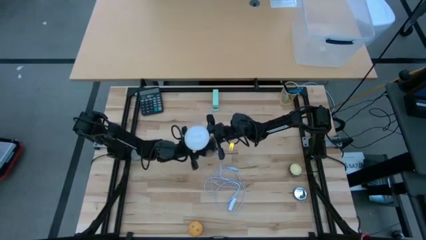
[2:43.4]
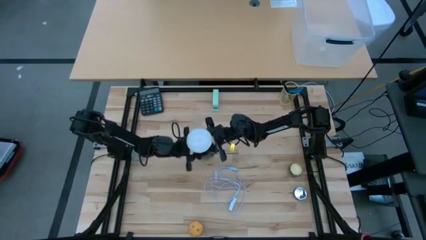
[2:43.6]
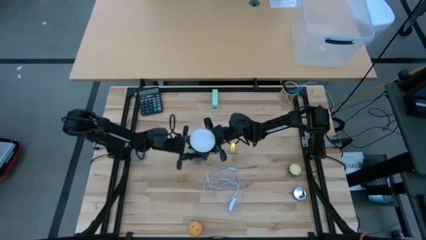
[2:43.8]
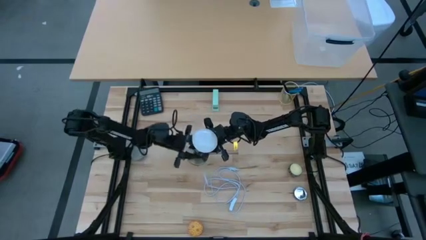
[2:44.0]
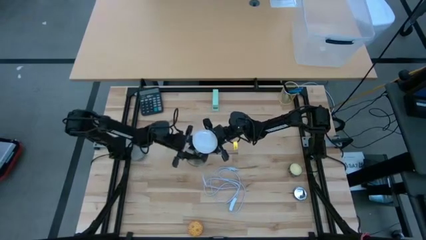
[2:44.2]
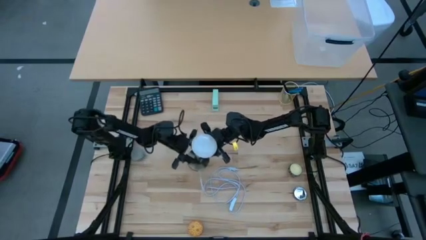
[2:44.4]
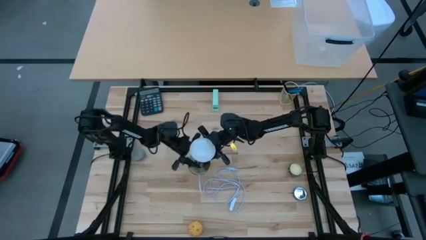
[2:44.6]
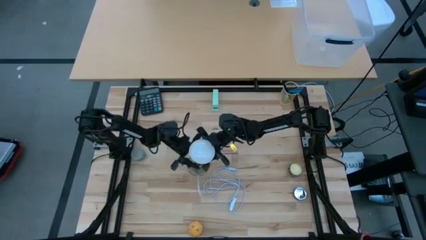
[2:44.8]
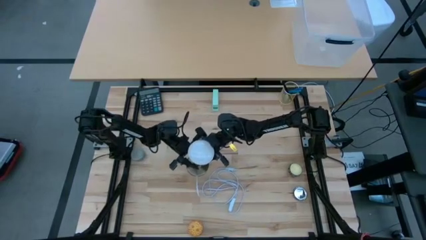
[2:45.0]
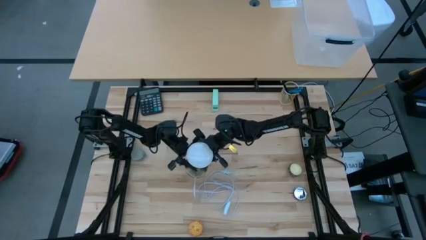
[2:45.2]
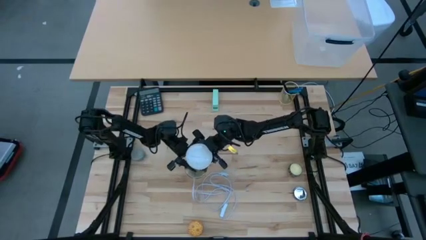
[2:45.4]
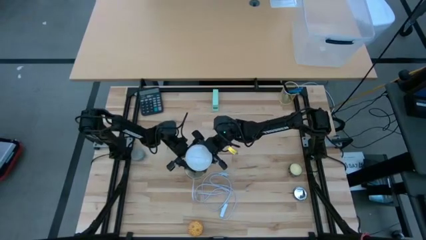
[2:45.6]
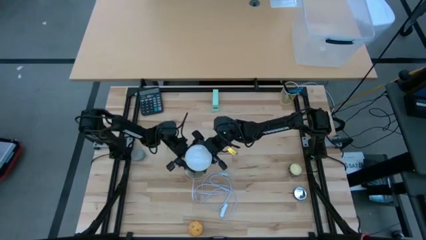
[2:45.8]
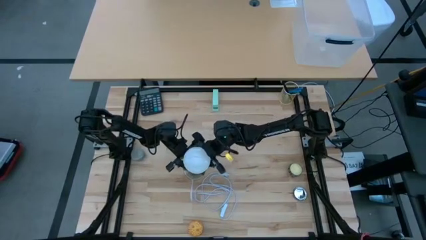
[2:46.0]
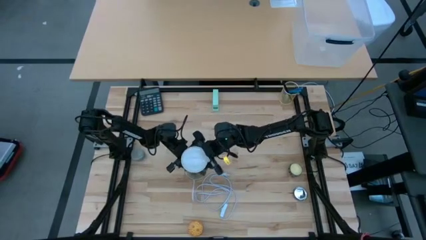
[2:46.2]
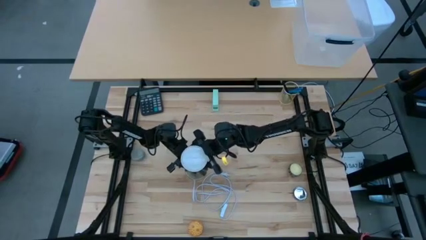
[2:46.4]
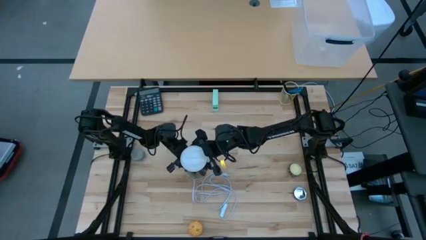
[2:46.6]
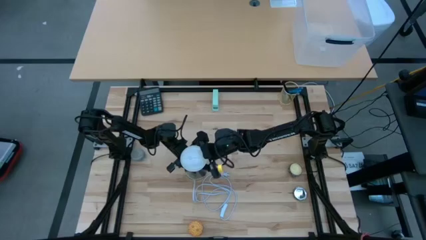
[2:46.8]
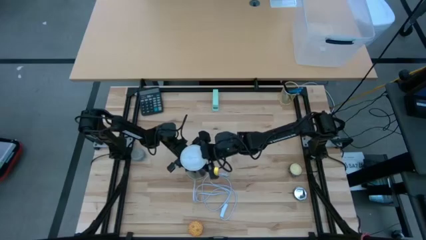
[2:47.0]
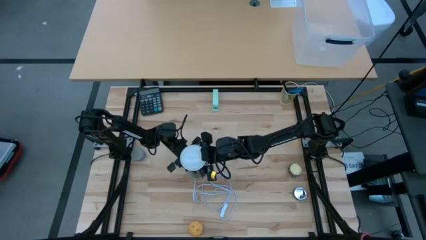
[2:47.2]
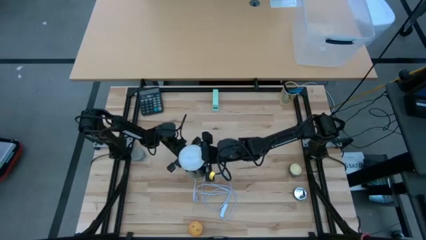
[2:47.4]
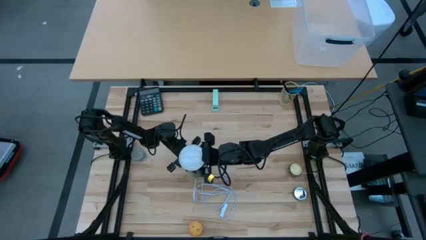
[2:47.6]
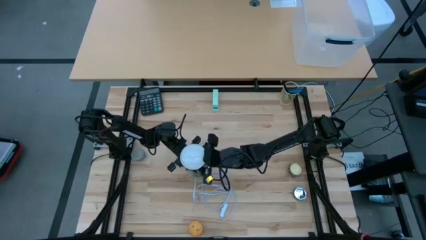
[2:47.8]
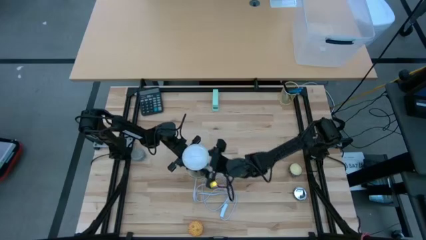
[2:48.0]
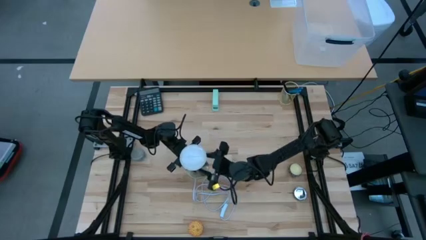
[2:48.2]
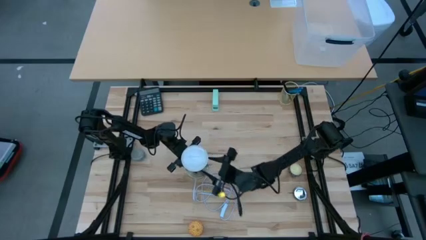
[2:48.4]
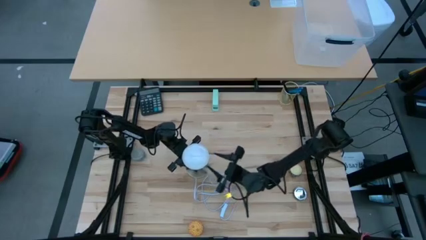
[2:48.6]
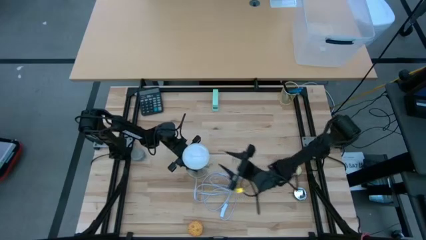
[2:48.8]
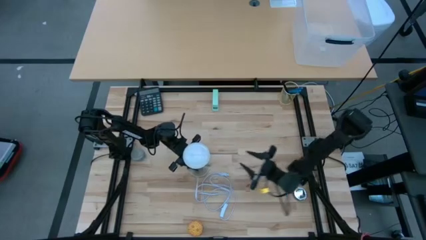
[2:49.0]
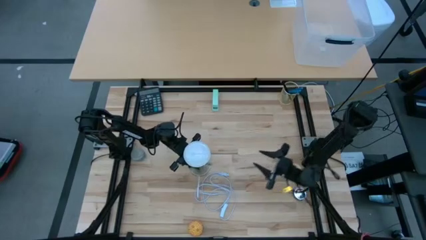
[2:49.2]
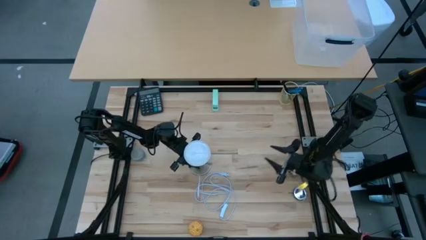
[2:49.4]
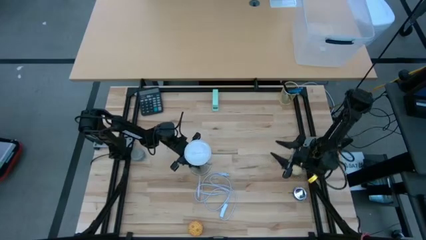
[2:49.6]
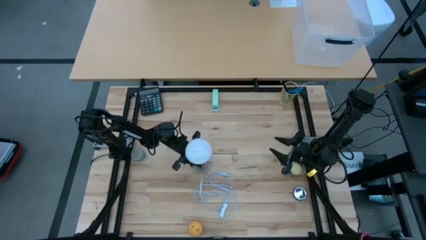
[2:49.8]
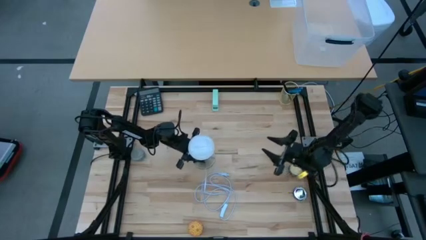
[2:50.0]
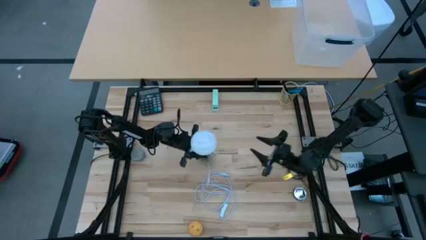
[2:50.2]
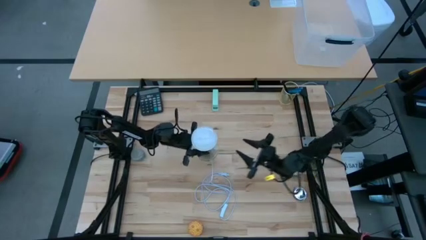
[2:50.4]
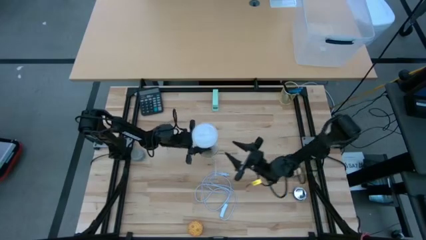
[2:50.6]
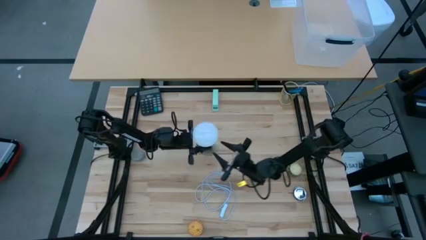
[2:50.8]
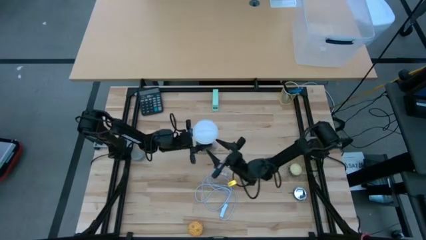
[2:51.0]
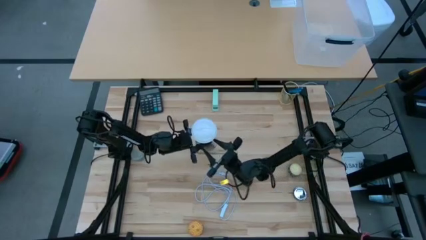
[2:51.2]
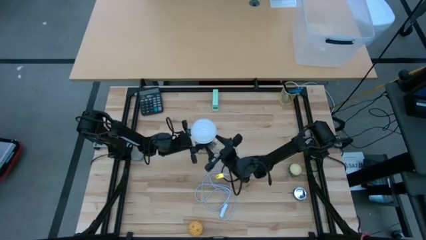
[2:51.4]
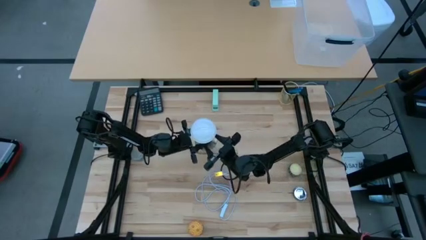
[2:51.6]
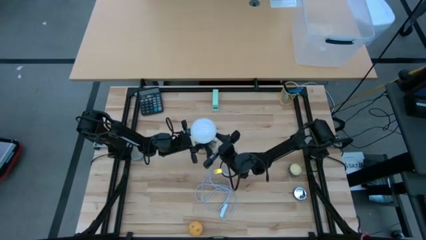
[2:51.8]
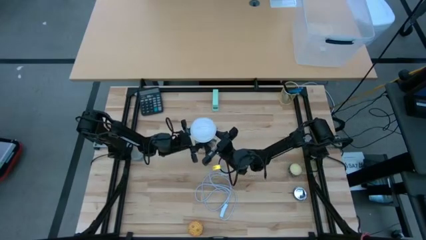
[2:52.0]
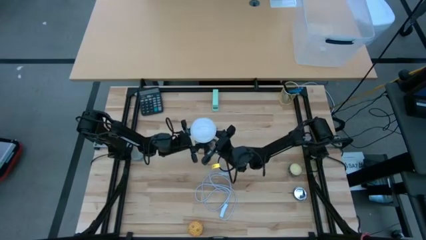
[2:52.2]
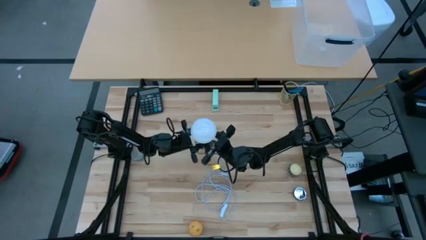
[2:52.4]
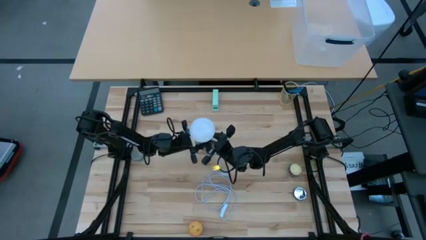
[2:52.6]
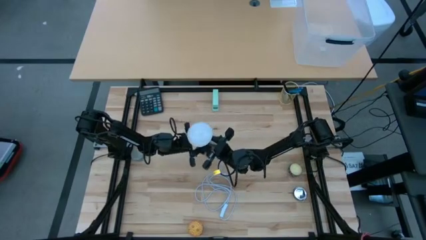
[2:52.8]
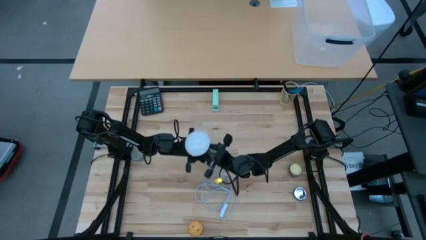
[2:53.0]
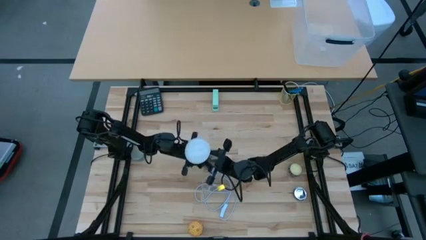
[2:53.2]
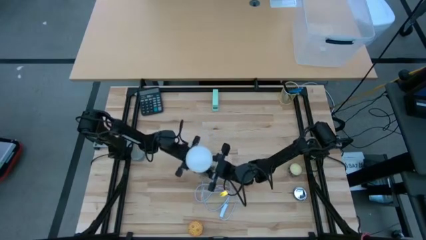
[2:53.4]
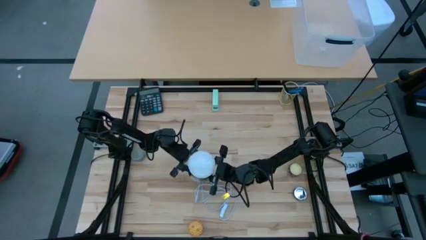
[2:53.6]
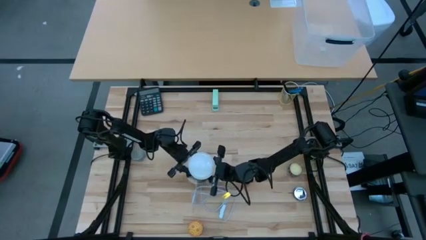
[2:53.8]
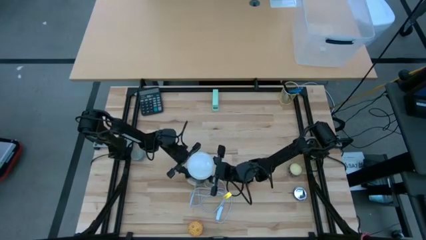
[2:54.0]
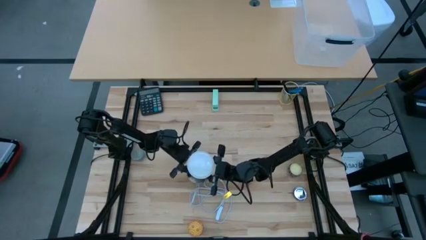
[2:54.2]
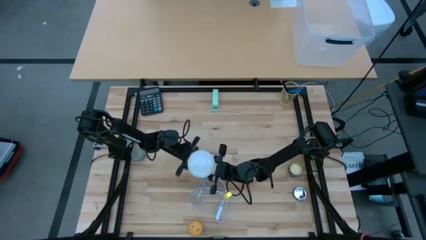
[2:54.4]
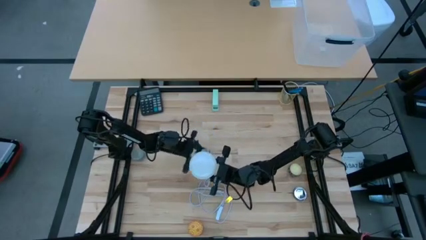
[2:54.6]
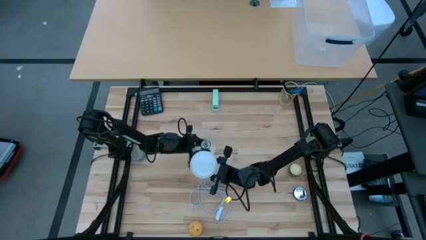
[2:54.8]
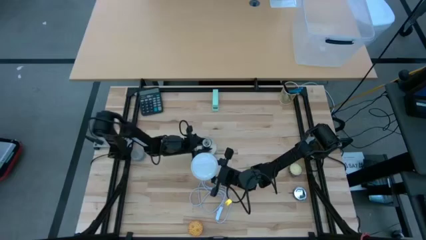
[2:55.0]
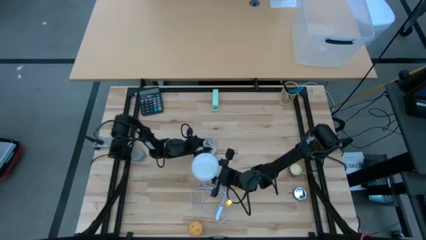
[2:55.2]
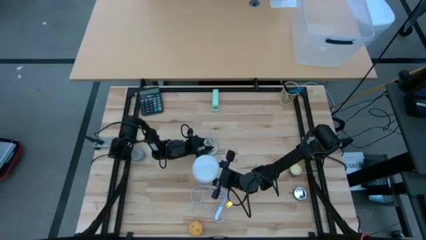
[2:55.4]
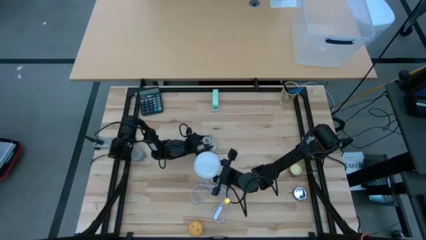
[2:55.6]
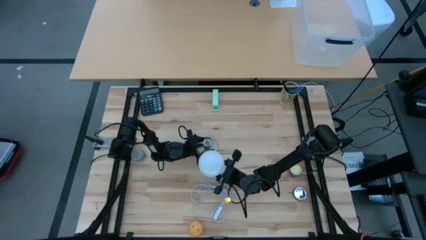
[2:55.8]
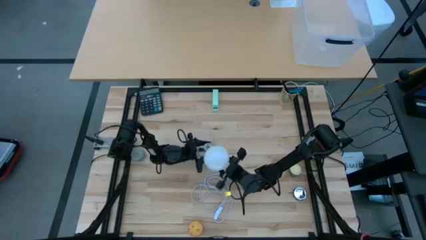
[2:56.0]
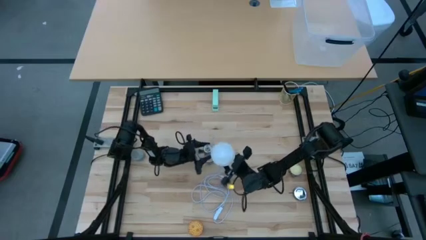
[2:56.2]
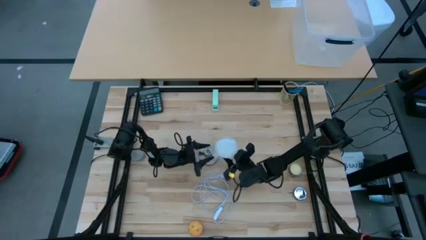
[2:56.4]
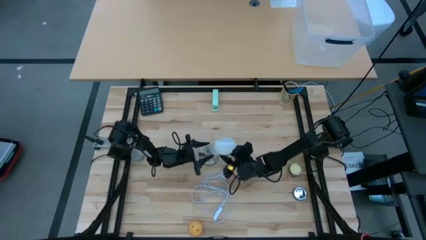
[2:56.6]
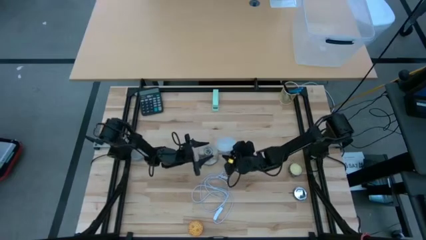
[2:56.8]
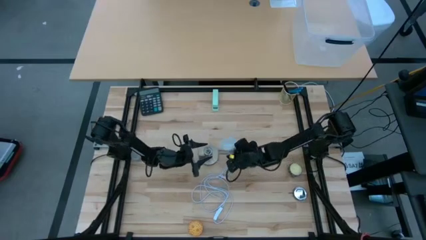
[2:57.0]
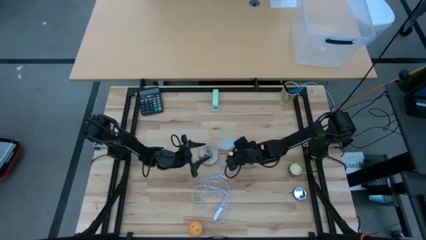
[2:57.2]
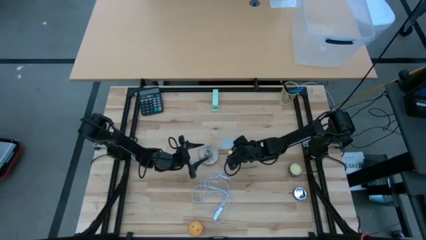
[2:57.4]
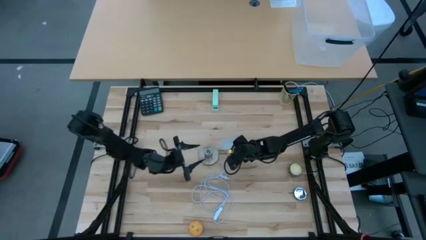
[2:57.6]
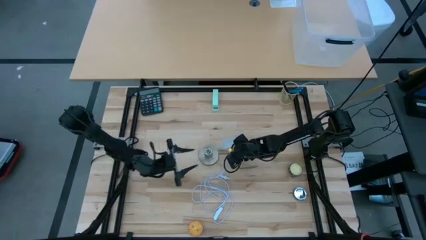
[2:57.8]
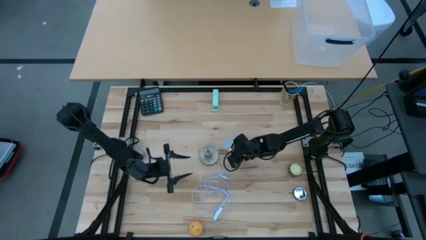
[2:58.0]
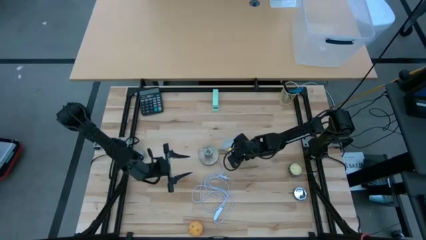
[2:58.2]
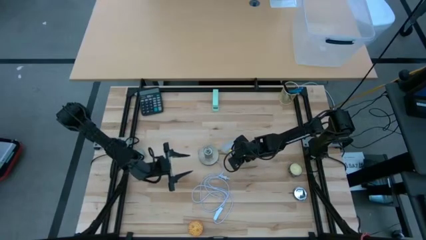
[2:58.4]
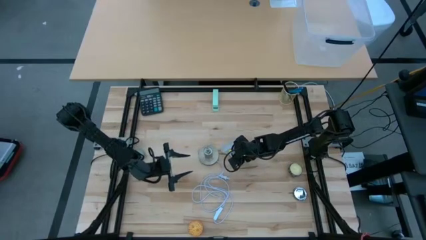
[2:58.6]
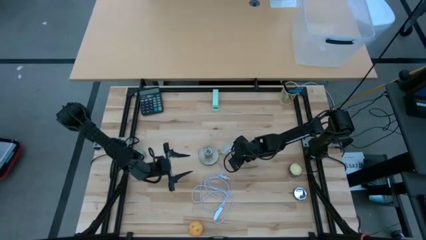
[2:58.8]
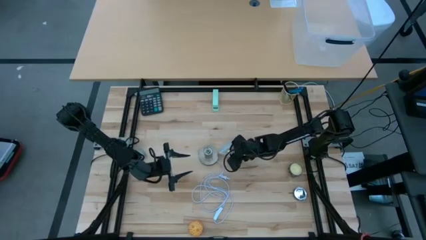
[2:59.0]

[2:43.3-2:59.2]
Task: Screw lightbulb
Remove the white lightbulb from the silver lamp
